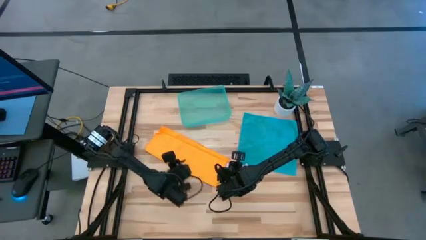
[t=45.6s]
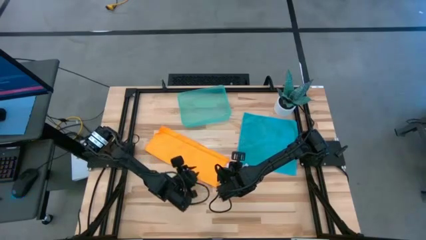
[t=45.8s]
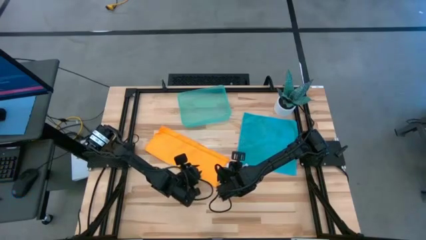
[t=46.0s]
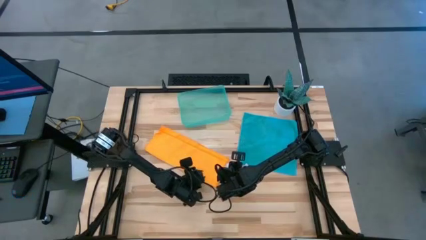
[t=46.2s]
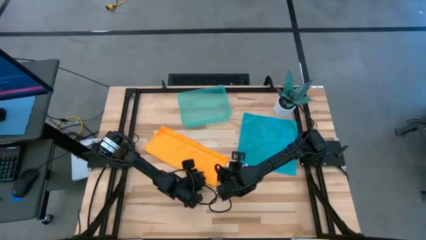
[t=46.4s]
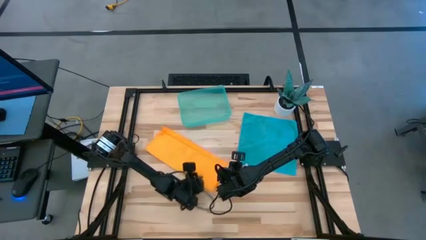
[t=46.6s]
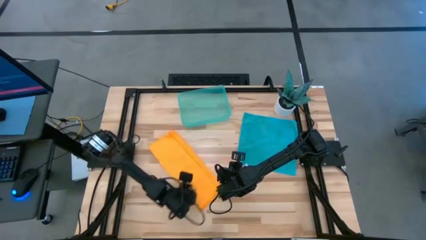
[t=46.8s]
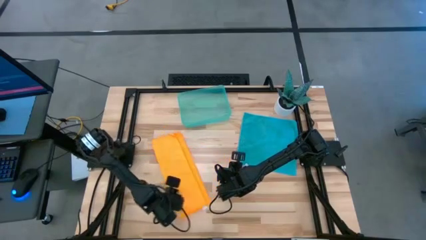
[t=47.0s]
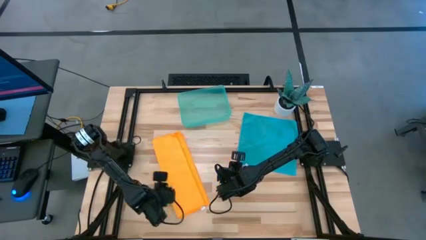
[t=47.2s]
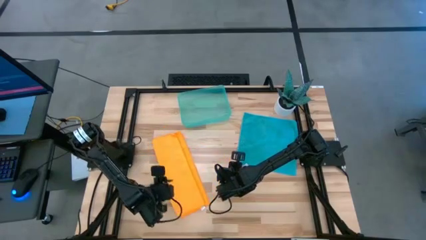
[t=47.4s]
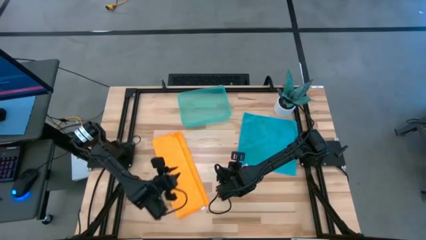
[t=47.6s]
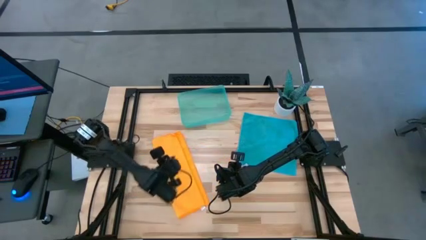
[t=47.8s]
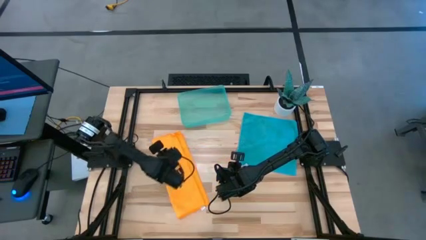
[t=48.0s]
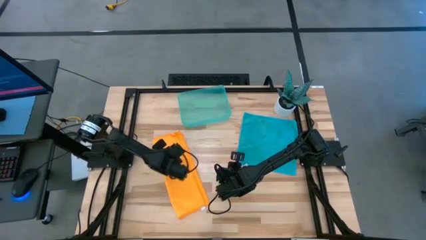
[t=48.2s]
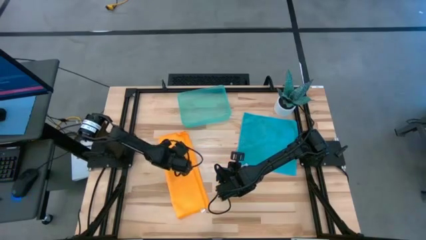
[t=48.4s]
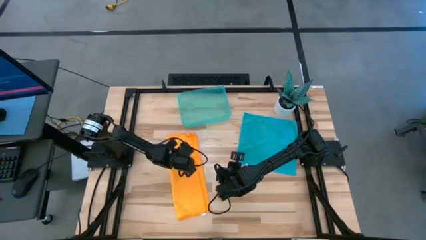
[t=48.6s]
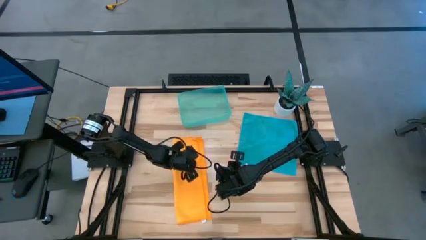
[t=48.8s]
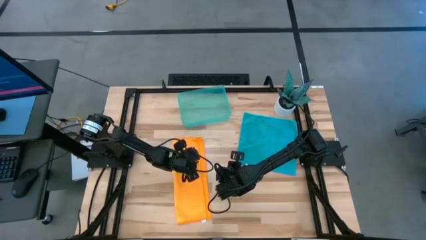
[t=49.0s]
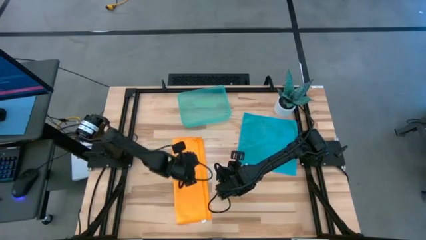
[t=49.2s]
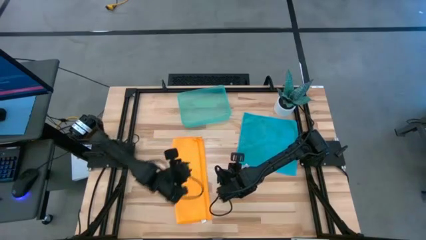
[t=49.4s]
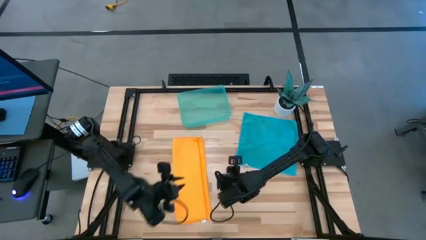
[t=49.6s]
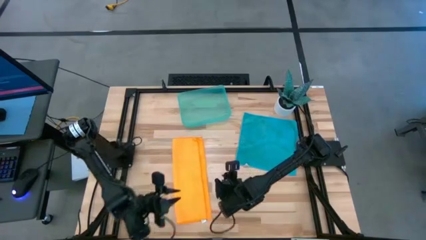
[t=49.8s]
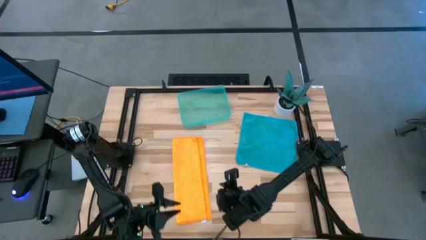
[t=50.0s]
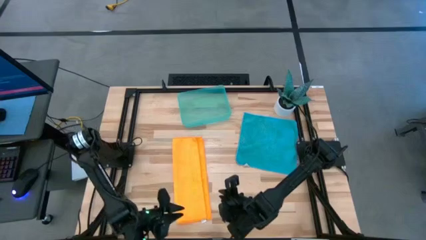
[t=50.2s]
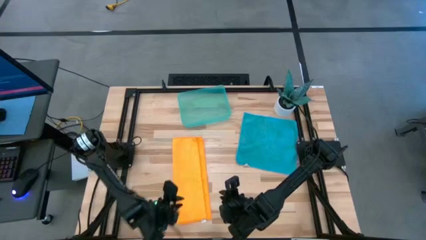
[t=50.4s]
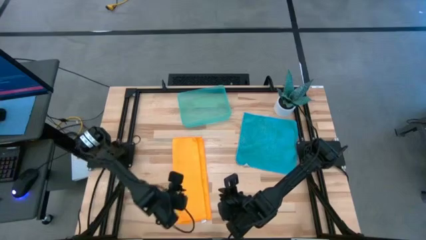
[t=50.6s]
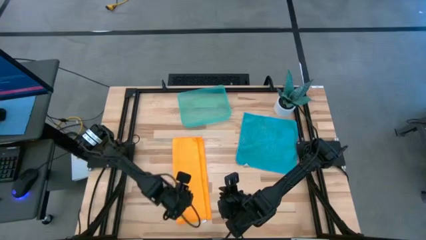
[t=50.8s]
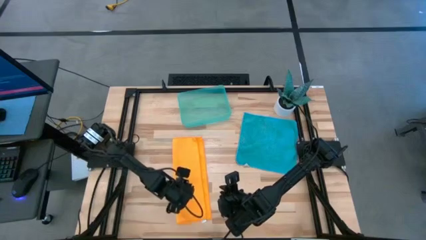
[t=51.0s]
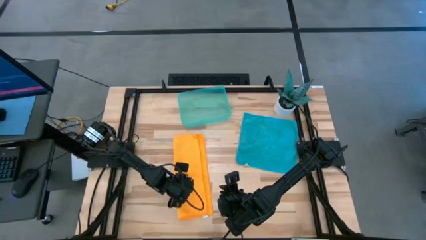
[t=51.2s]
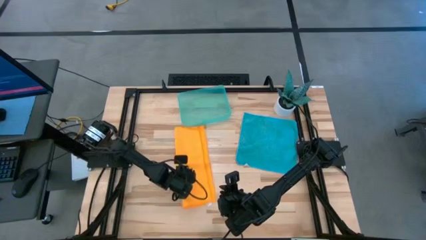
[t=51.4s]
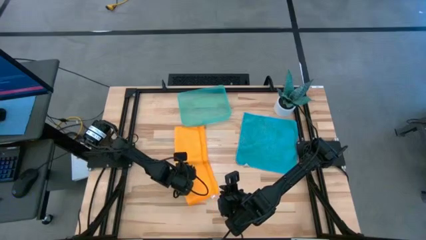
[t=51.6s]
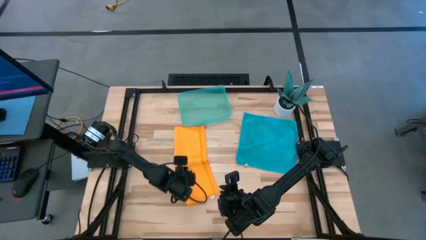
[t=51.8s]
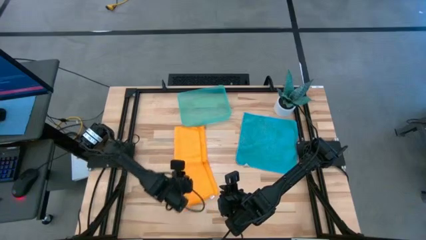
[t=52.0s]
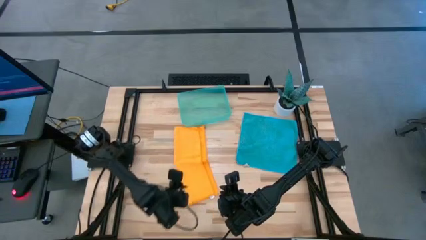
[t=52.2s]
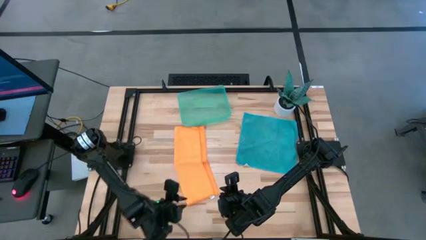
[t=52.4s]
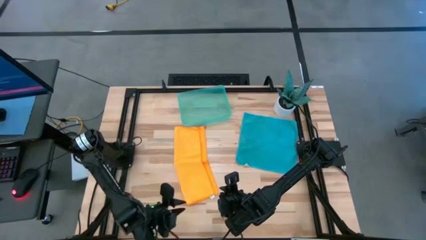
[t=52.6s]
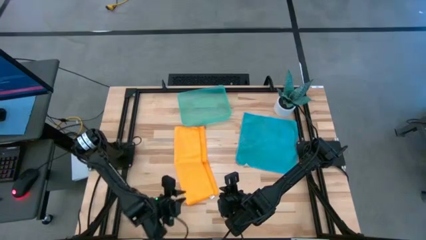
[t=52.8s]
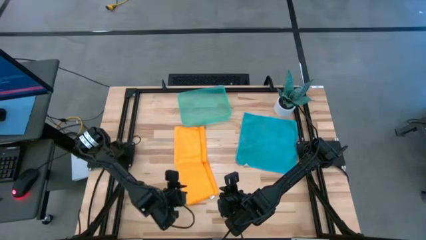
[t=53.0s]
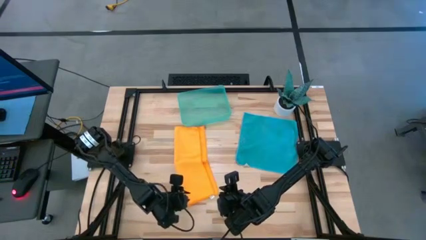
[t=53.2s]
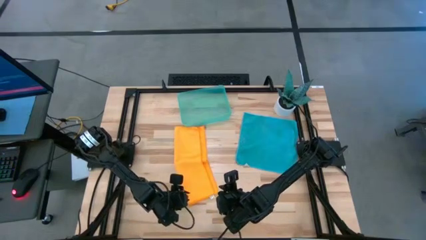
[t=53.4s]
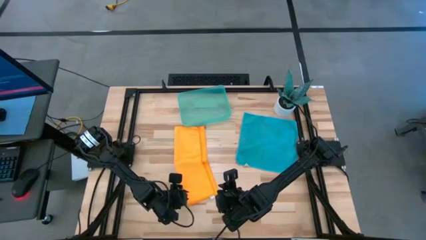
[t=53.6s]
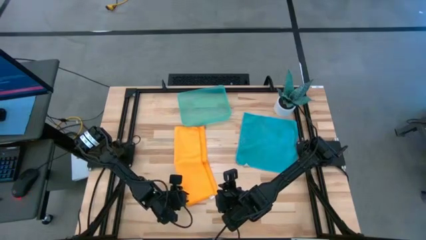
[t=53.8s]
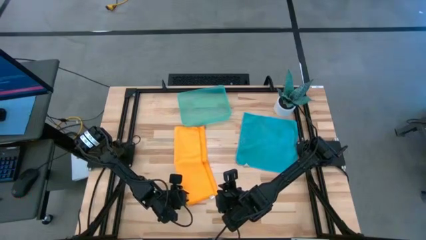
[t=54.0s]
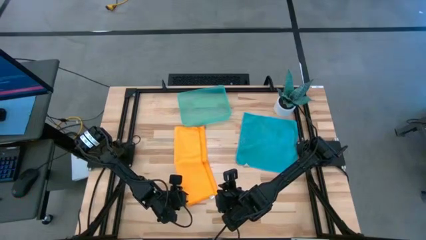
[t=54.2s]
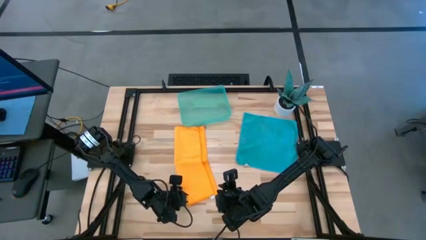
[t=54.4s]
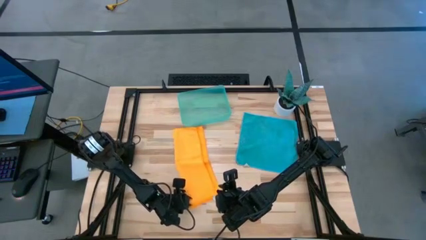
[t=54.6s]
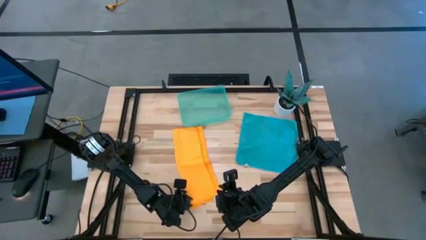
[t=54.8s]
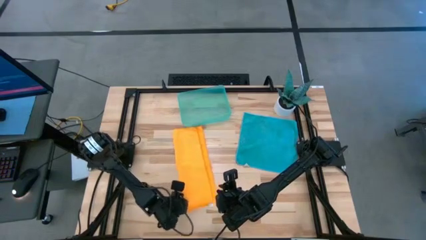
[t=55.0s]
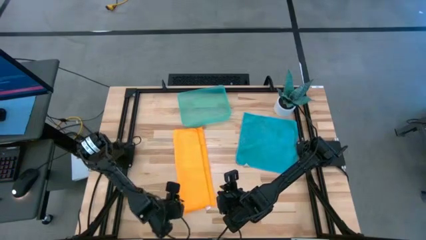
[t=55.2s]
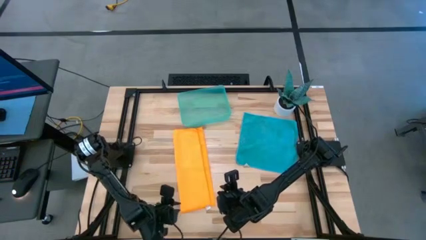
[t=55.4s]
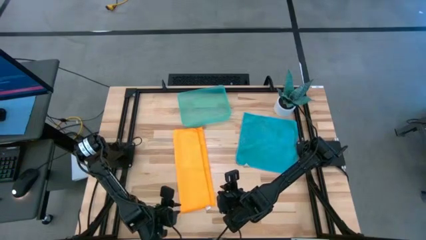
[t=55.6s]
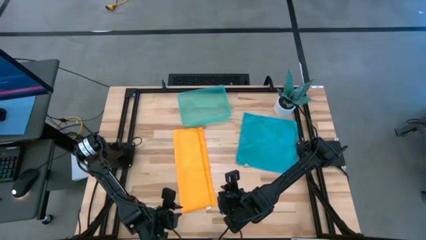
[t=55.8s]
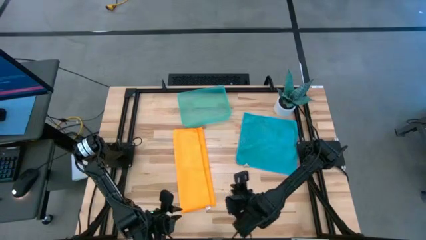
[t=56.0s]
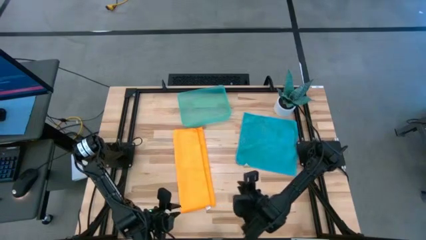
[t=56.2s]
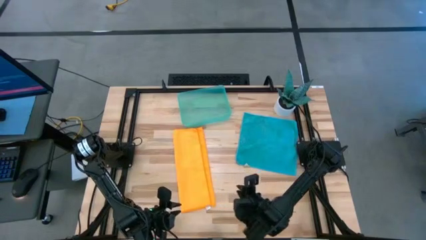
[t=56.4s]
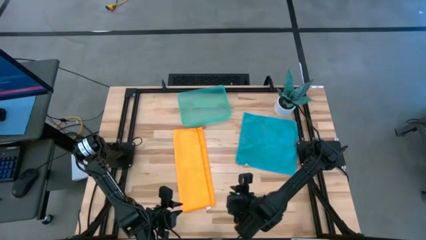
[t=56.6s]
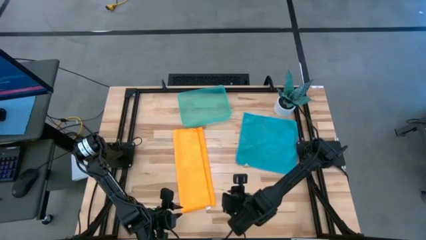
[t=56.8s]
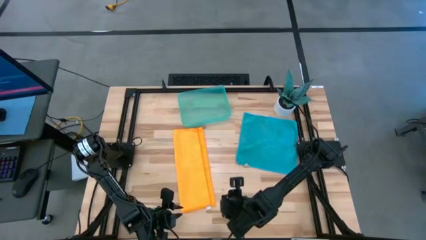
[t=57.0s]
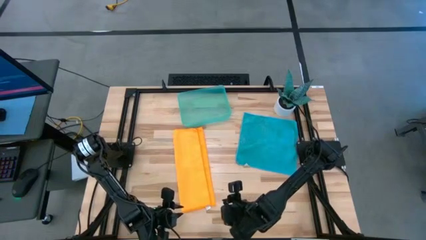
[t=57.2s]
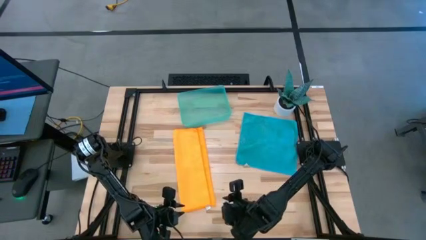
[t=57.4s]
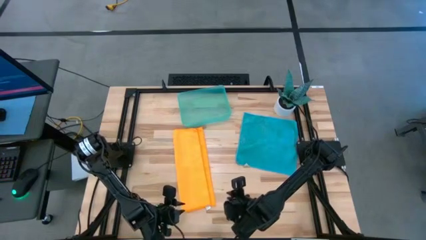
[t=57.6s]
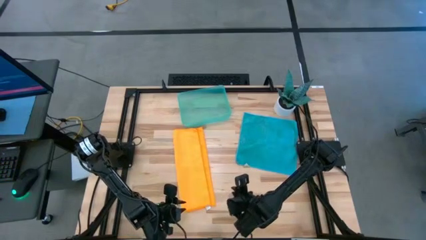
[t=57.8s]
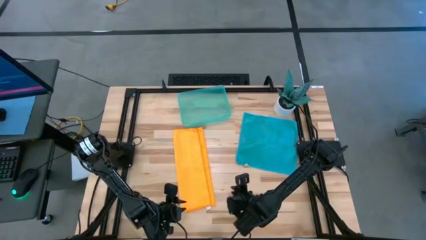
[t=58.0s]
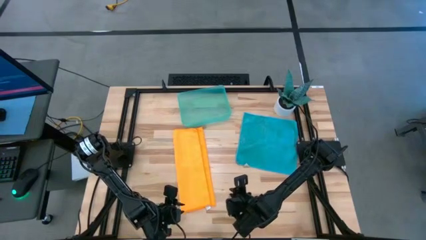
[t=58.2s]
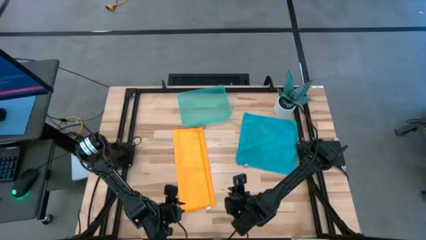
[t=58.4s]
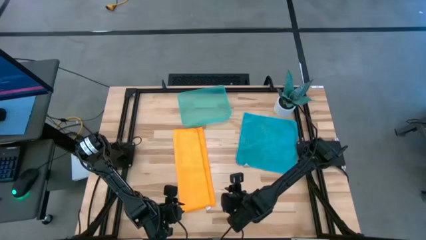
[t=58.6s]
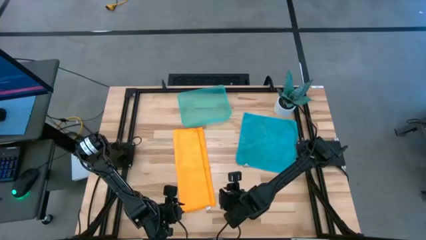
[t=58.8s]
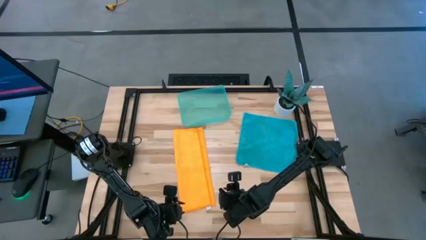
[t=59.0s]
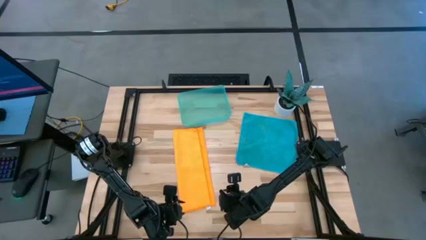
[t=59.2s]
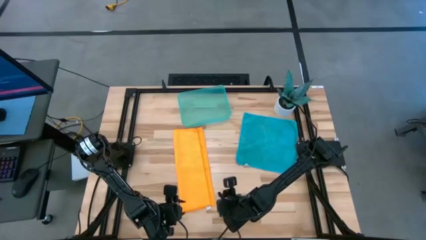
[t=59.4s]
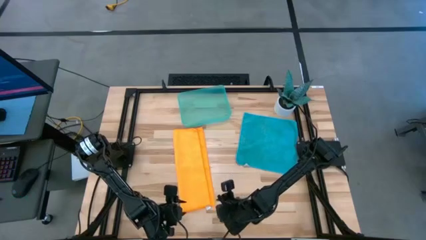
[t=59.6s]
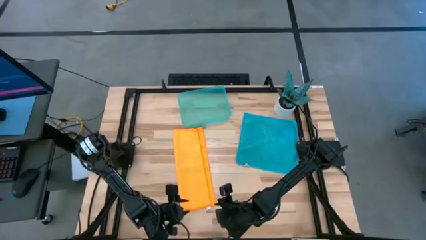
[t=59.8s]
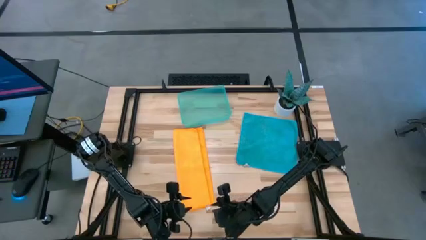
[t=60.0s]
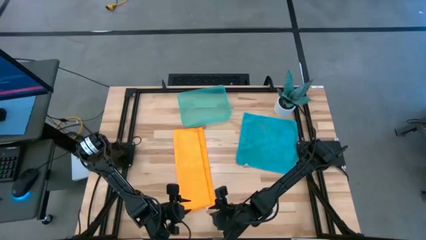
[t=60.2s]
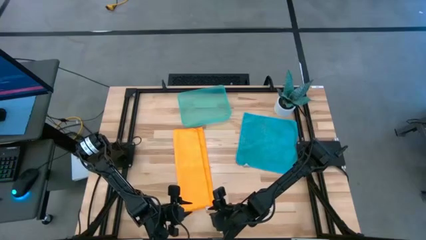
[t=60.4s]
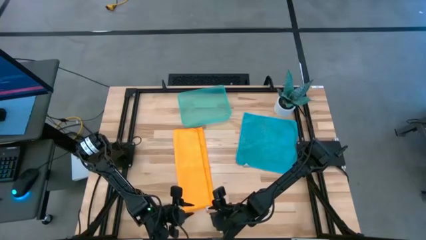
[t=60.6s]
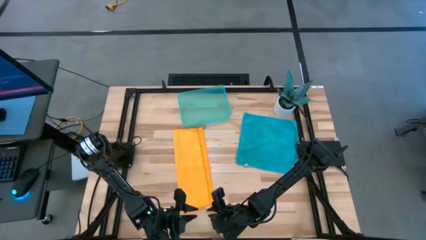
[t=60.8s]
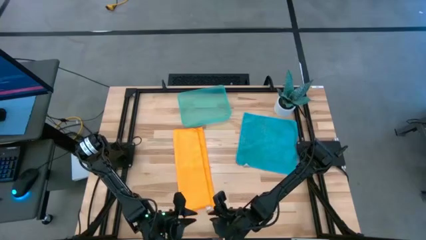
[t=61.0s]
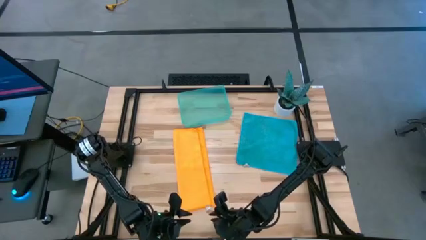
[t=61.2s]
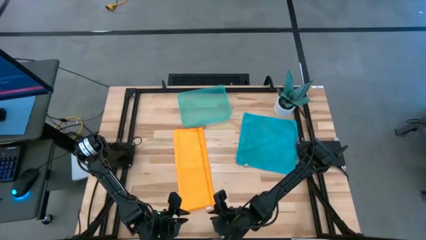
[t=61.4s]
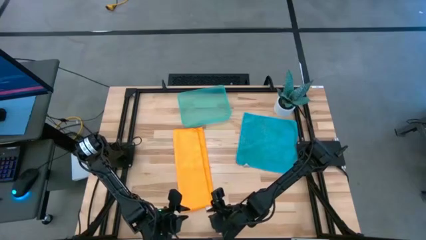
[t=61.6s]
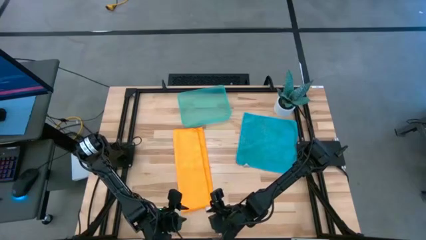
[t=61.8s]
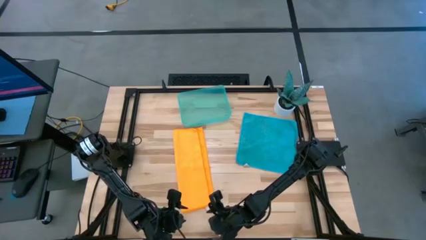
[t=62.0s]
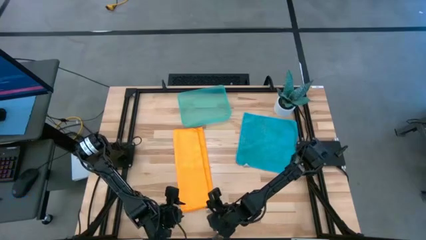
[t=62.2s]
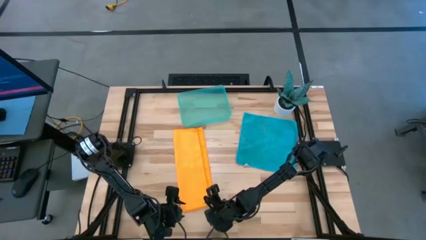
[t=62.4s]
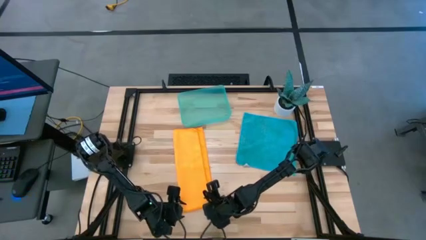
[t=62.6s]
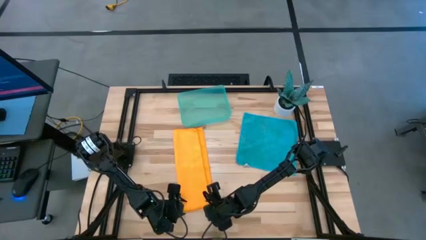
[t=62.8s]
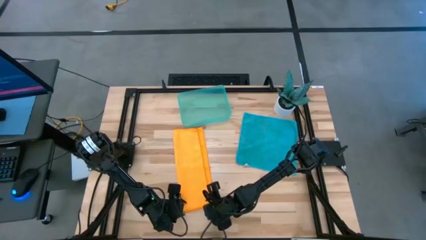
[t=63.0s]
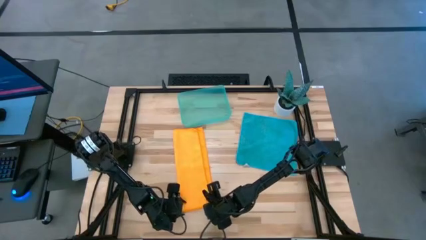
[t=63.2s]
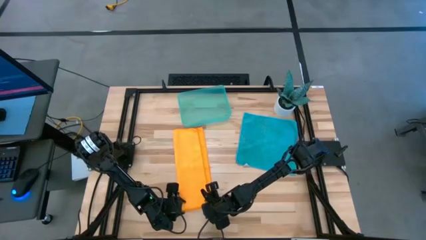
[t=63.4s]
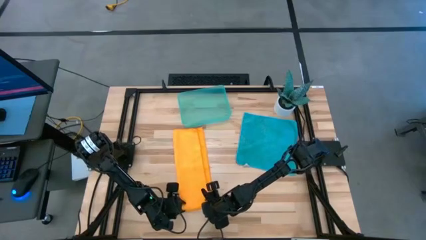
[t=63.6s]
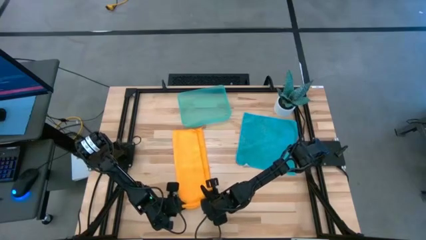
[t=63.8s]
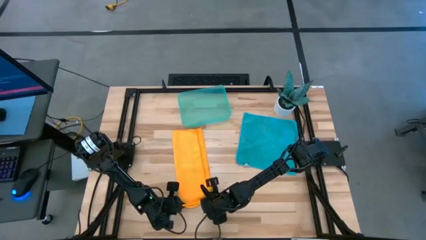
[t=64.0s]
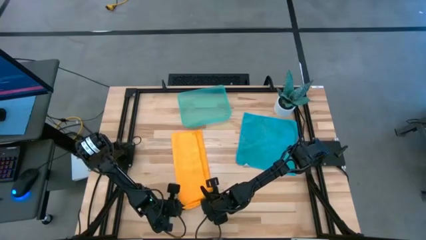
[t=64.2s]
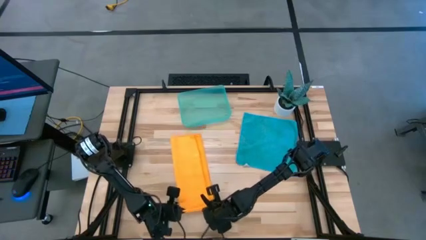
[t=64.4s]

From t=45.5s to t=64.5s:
Task: Roll microfiber towels into tight, uniform cylinder then place into a basket
Roll the yellow microfiber towel
